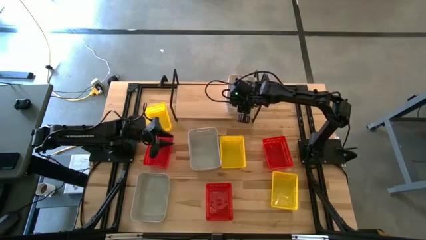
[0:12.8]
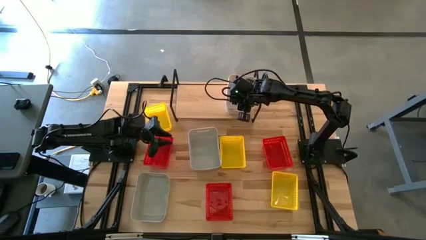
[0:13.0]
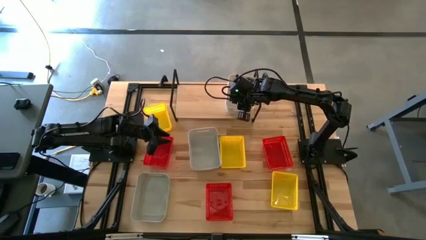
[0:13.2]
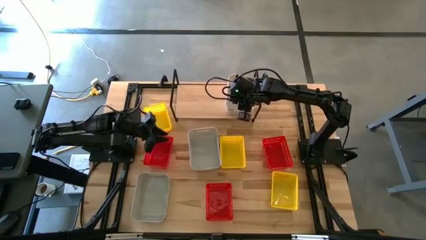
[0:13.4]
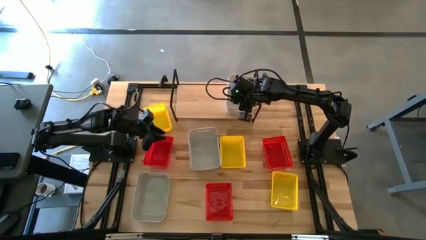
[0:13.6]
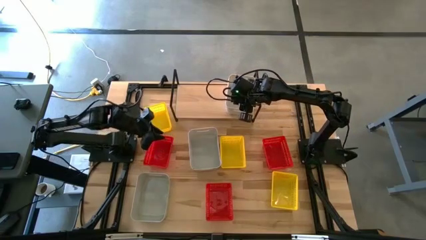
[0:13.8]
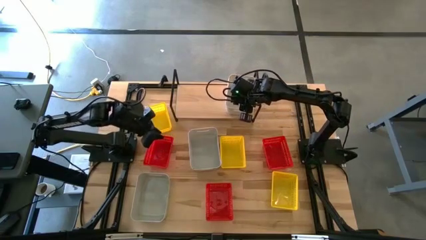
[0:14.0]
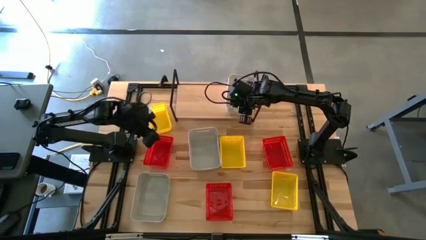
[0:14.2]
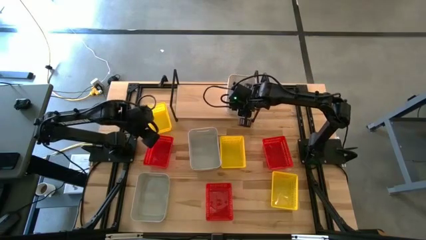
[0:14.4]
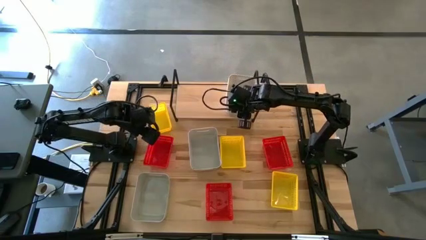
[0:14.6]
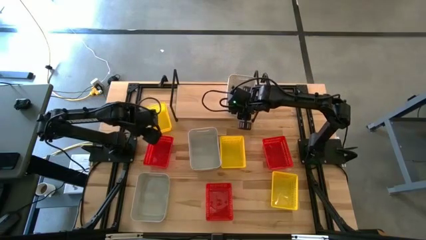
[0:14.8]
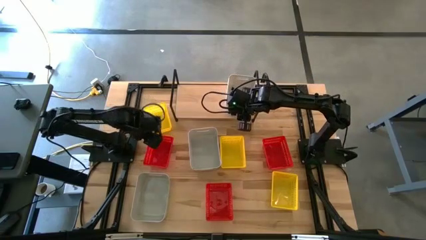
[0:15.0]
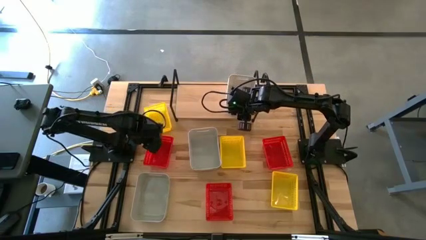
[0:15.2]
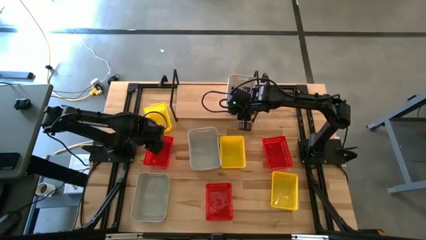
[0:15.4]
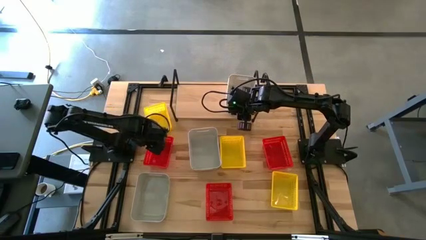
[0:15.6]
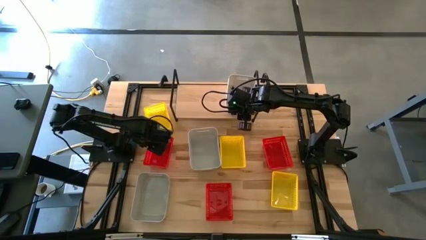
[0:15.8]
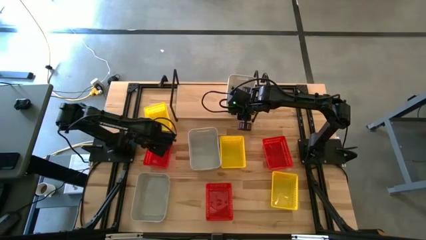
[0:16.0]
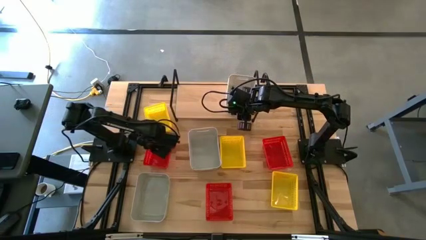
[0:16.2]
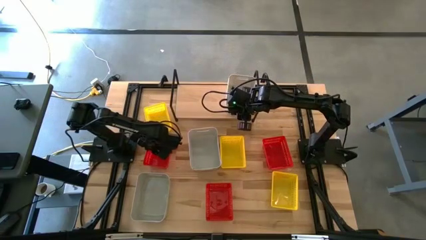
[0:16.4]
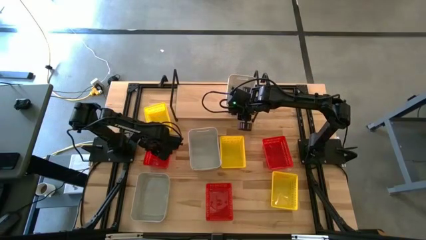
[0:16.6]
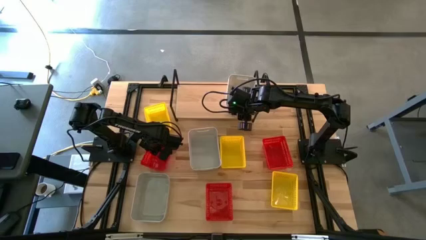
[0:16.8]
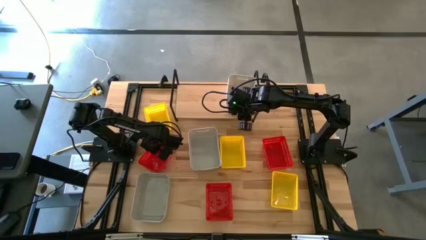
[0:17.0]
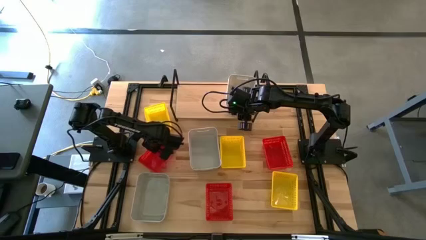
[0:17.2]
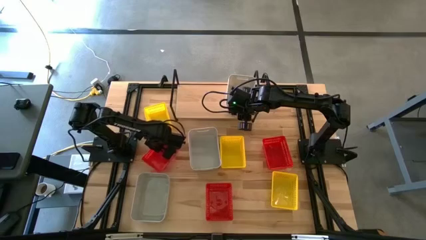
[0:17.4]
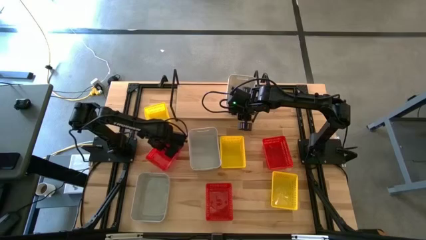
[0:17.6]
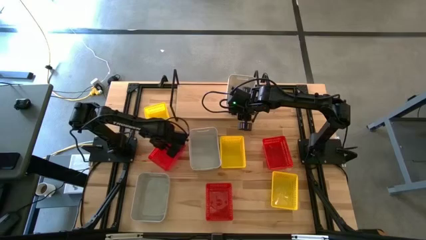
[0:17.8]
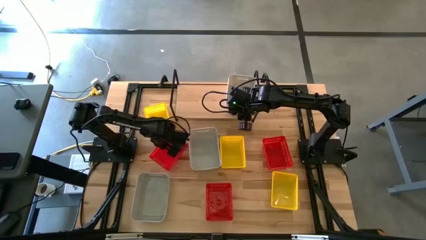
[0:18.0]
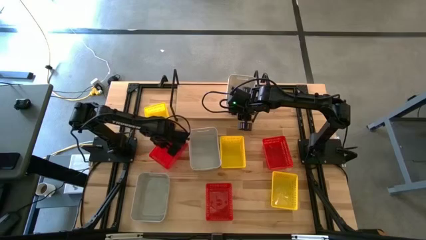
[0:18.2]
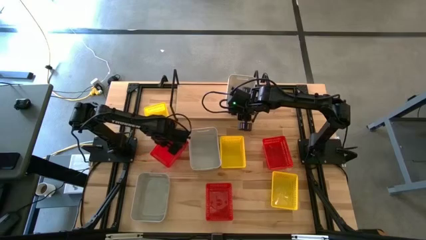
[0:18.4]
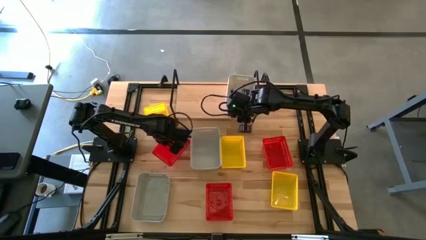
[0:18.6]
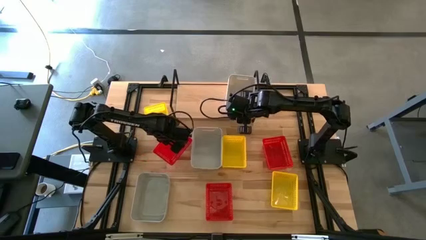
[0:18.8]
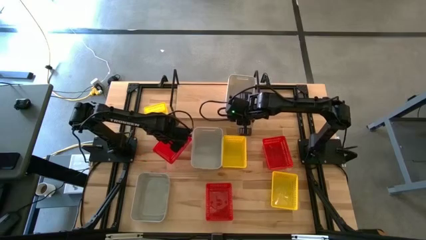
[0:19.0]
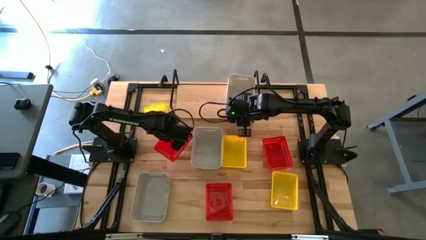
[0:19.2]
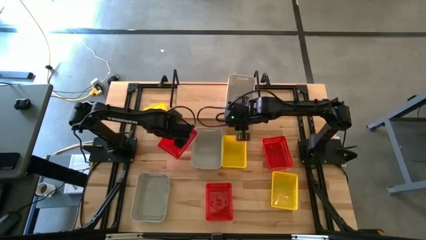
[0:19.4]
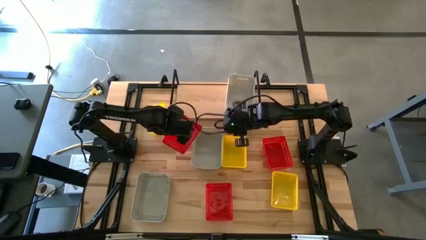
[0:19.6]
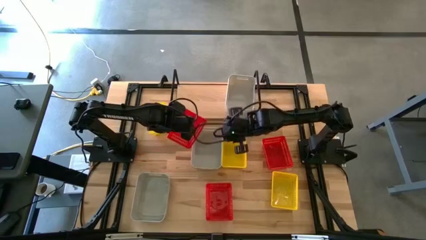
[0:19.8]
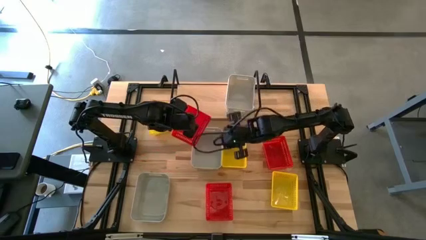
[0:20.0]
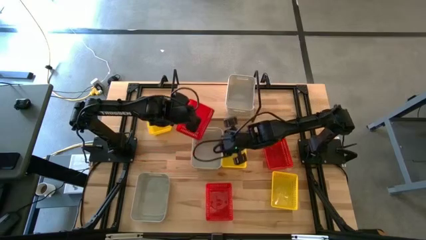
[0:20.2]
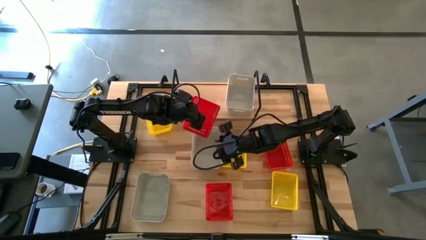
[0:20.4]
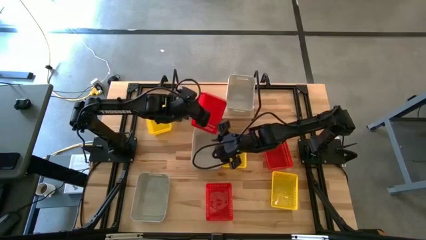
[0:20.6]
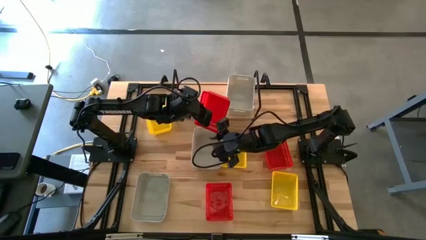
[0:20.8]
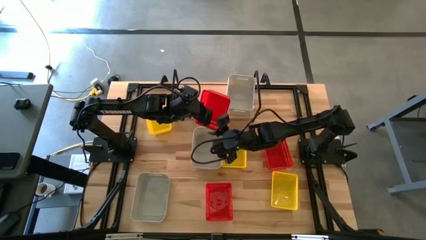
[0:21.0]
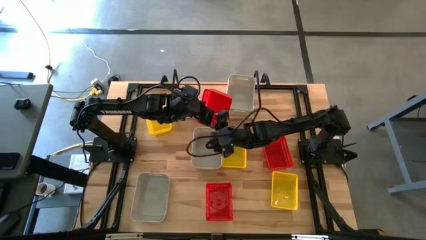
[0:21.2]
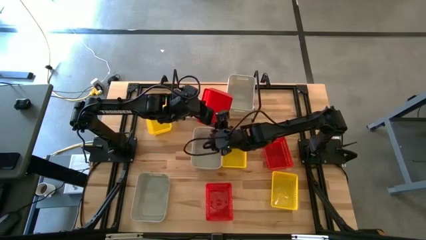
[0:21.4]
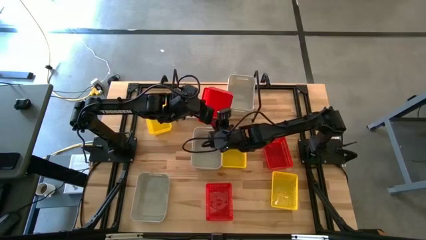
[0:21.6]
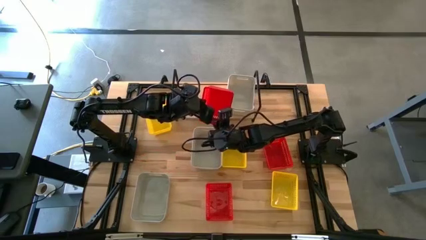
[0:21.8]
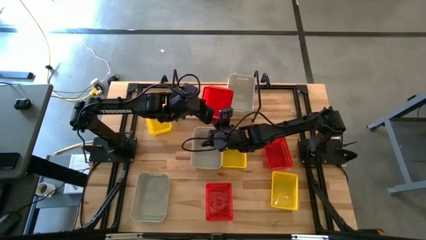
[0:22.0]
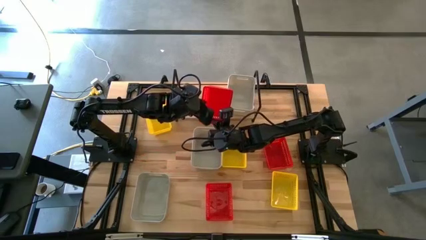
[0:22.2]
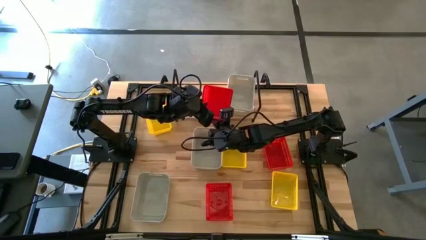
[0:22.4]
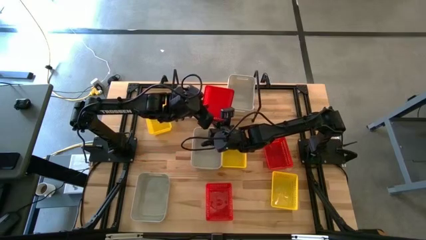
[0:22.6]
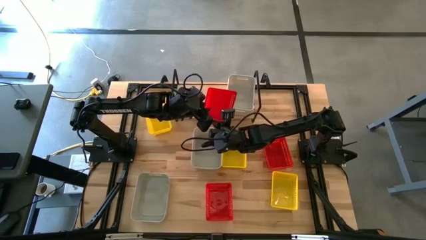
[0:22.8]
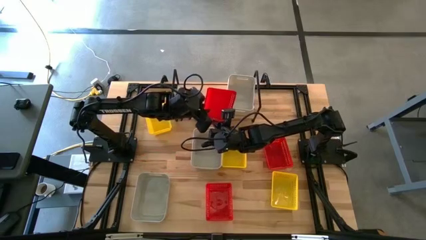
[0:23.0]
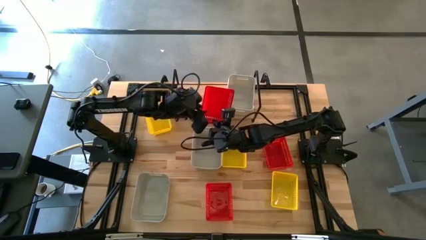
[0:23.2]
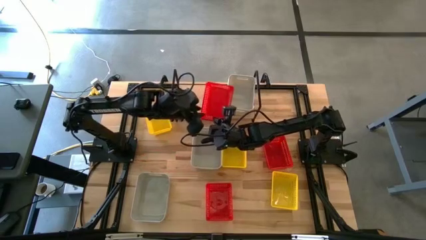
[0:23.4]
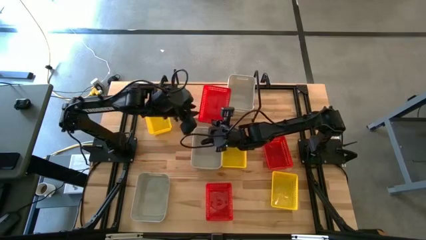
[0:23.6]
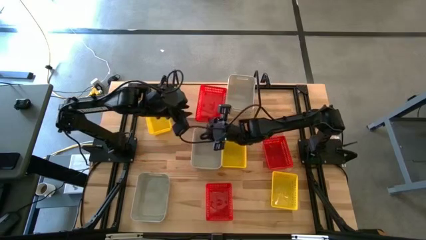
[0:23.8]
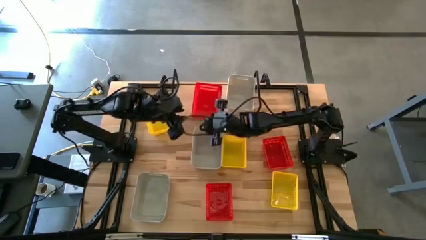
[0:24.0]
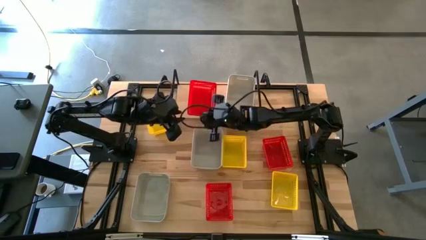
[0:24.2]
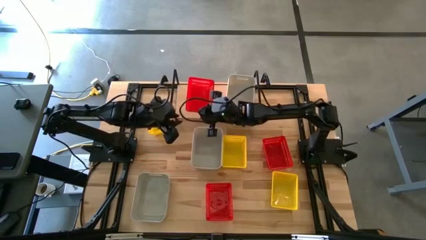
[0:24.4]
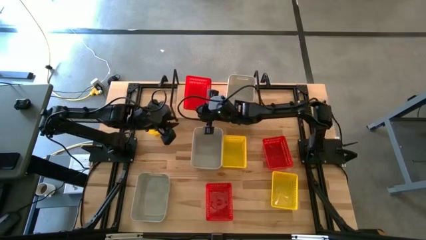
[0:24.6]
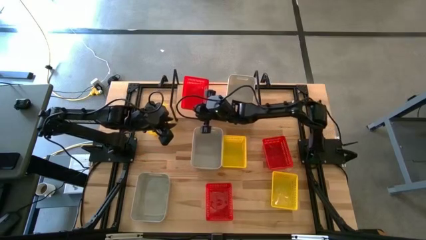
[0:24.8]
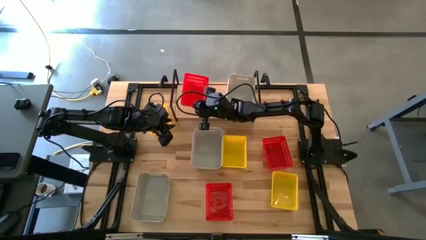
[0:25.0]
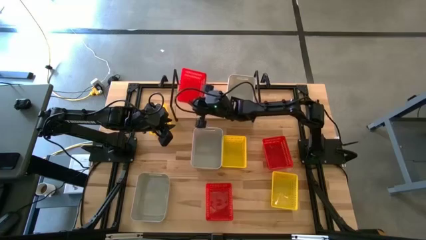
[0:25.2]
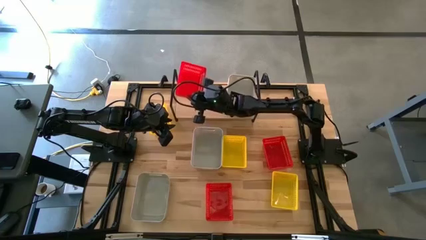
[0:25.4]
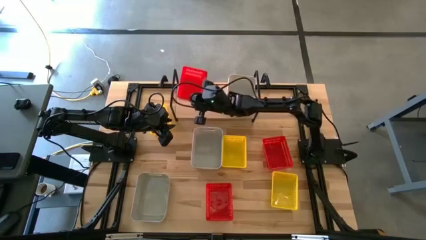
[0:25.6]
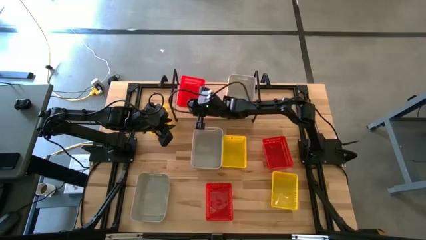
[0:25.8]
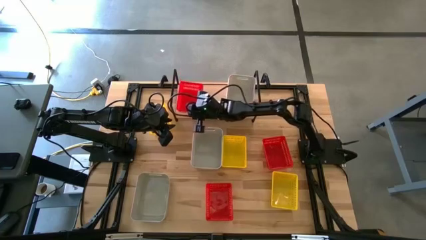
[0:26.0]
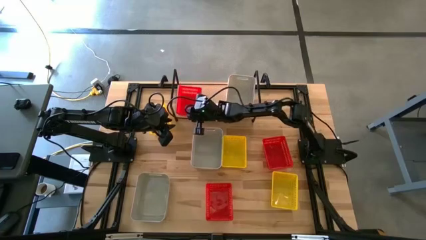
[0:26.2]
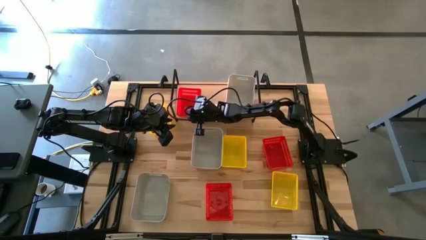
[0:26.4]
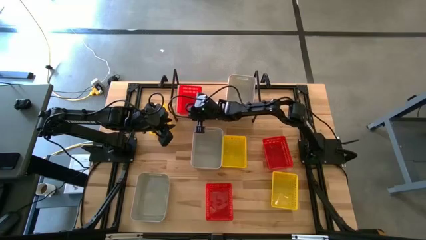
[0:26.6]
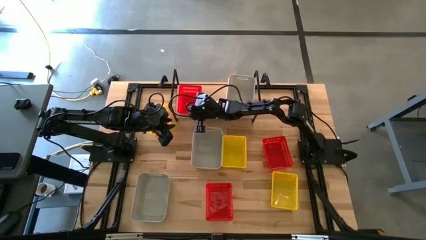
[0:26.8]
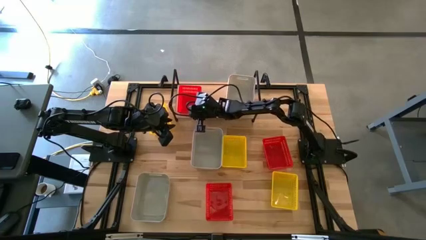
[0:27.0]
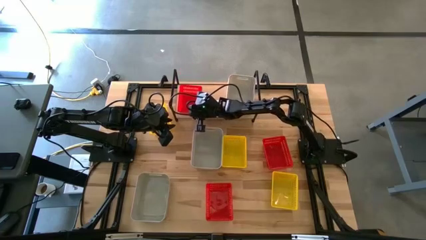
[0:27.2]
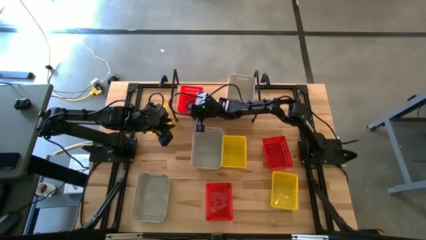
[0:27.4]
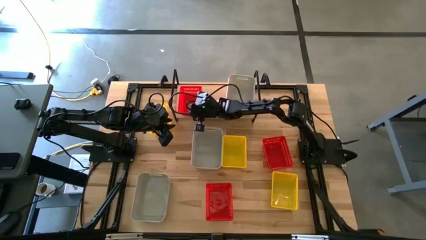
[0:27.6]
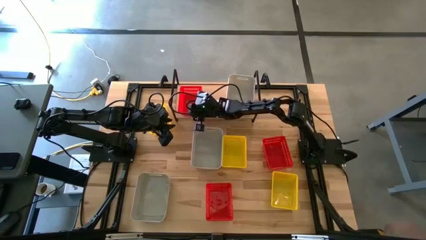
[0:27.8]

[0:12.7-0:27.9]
Task: Stack baskets on shelf by color
Put the top left red tray on the shelf
